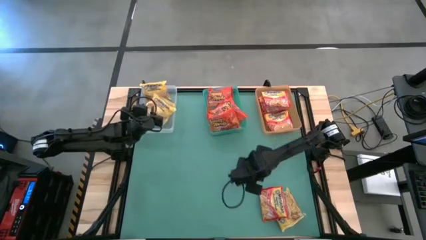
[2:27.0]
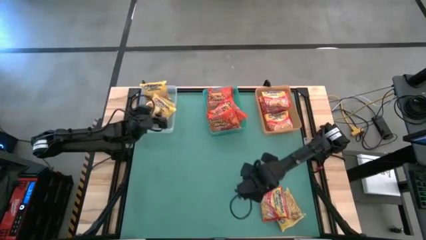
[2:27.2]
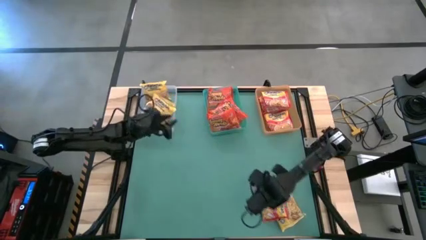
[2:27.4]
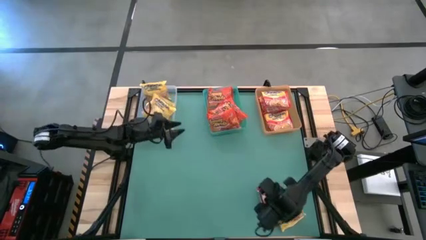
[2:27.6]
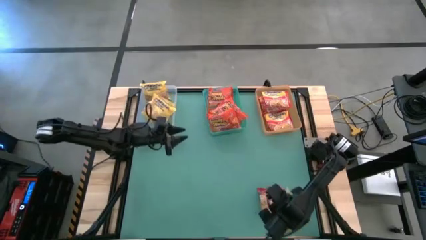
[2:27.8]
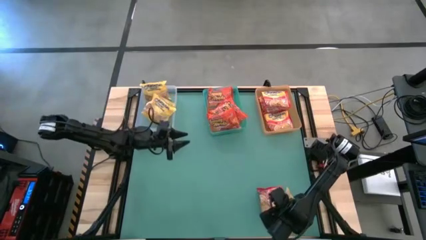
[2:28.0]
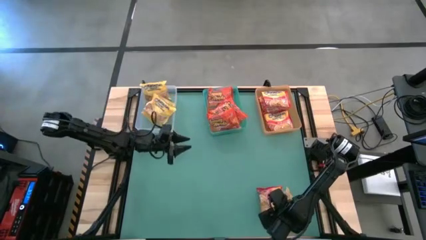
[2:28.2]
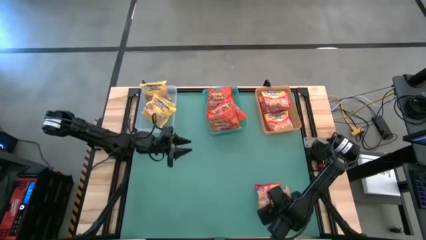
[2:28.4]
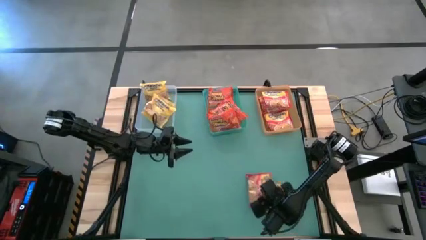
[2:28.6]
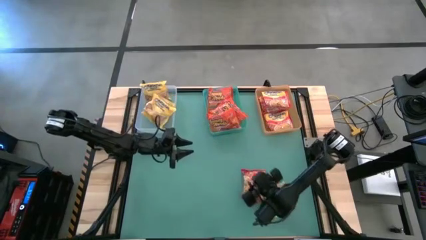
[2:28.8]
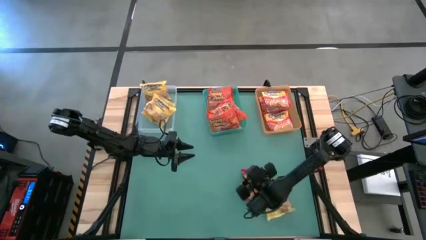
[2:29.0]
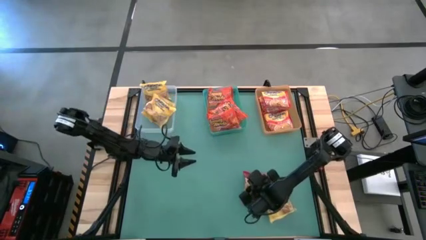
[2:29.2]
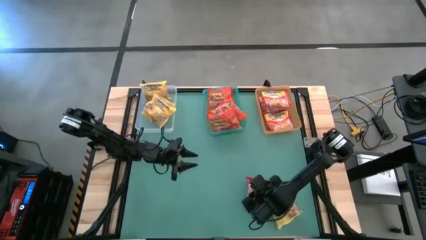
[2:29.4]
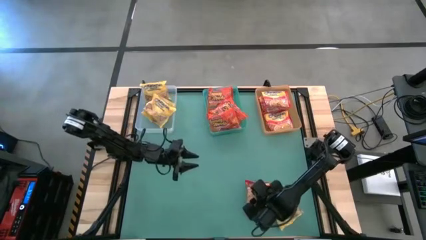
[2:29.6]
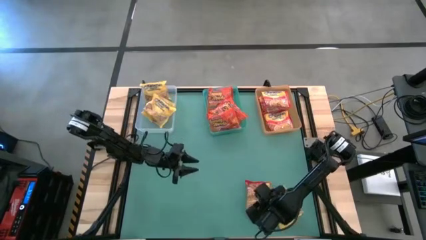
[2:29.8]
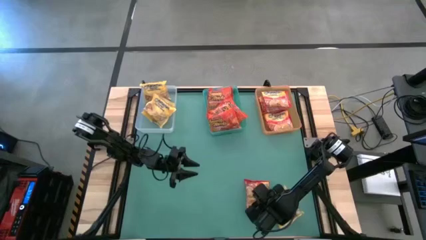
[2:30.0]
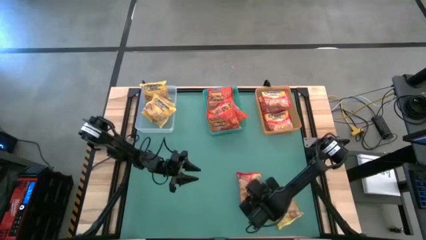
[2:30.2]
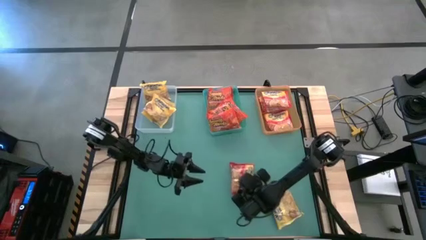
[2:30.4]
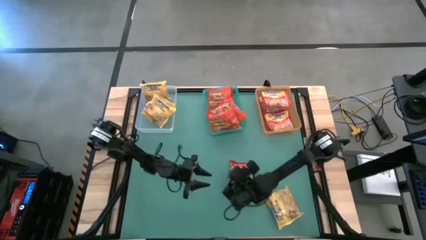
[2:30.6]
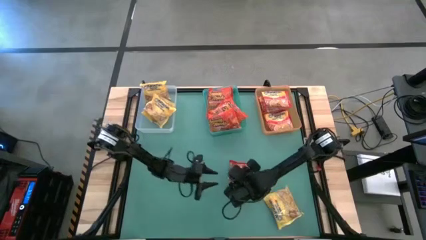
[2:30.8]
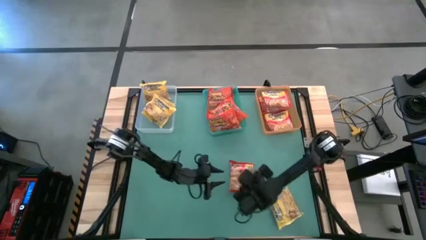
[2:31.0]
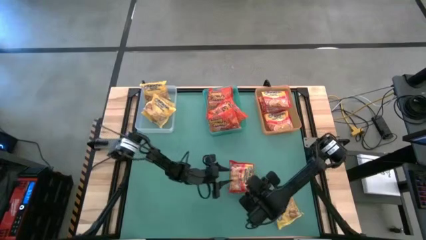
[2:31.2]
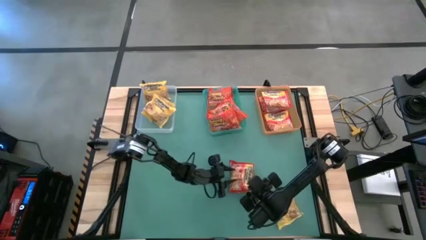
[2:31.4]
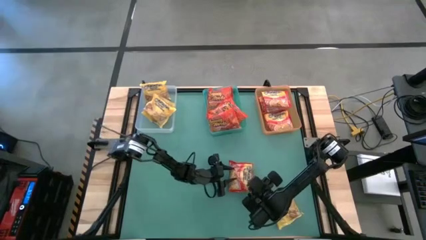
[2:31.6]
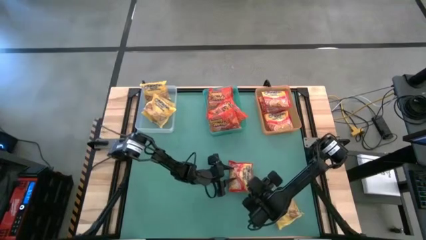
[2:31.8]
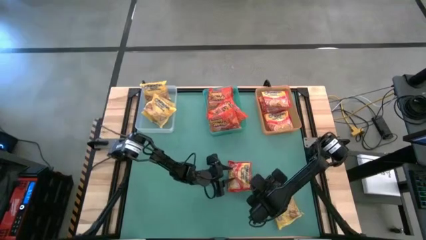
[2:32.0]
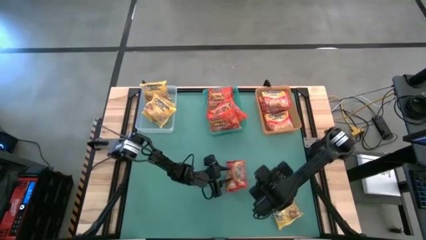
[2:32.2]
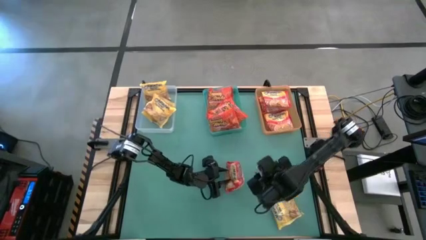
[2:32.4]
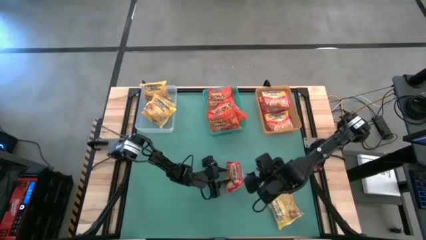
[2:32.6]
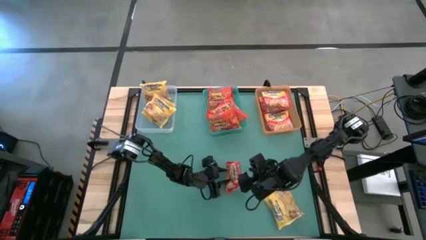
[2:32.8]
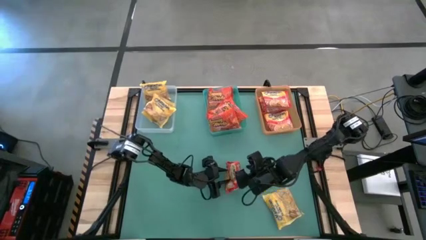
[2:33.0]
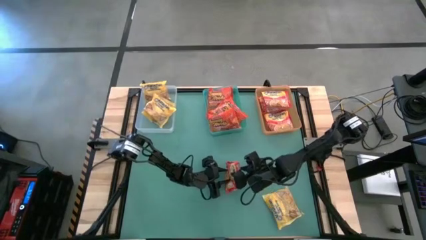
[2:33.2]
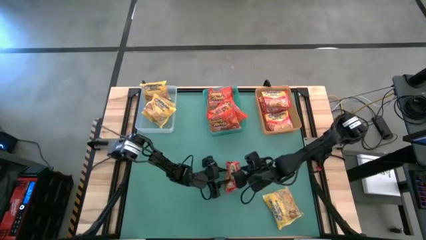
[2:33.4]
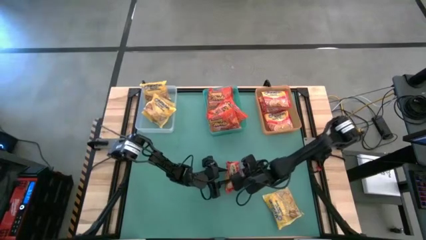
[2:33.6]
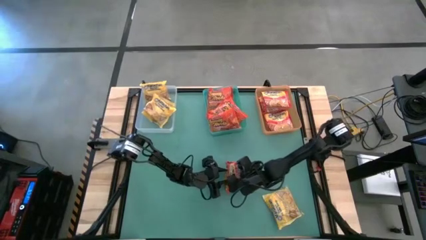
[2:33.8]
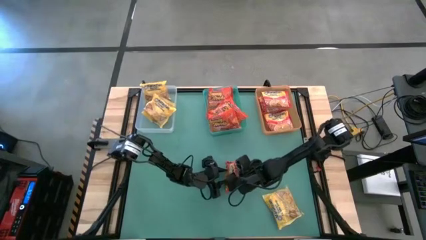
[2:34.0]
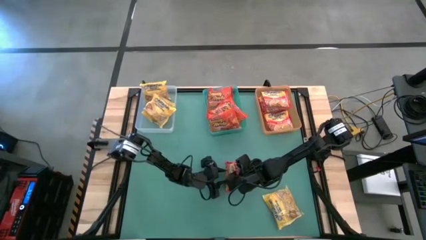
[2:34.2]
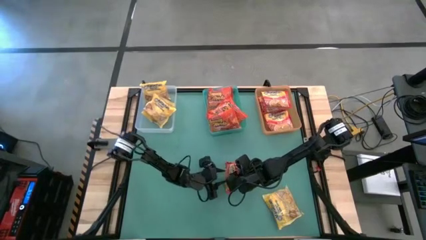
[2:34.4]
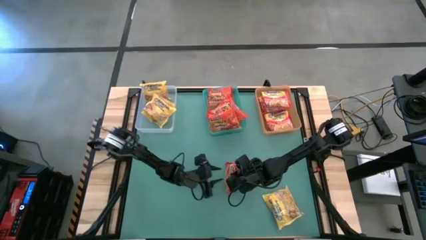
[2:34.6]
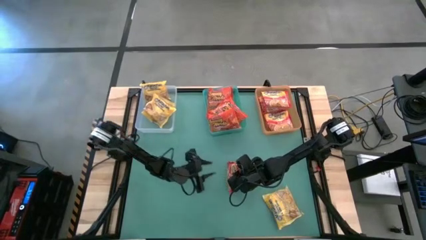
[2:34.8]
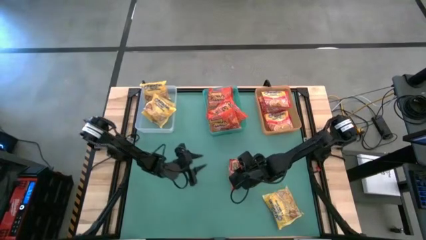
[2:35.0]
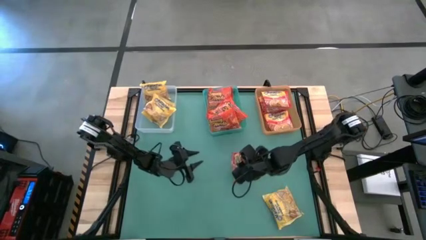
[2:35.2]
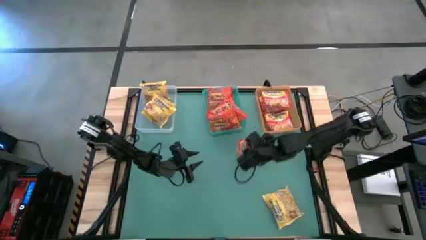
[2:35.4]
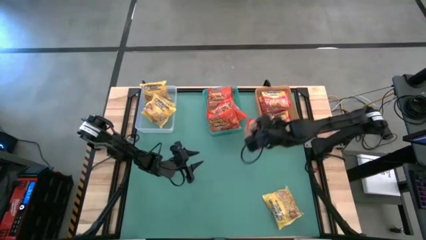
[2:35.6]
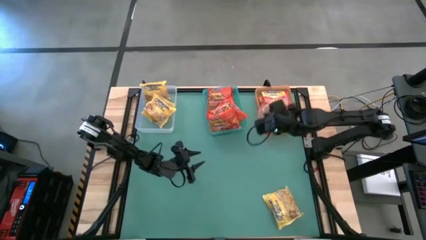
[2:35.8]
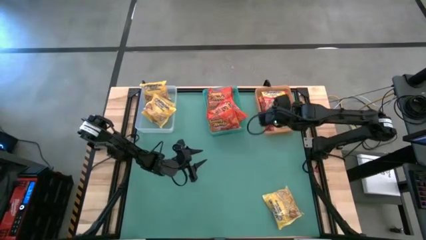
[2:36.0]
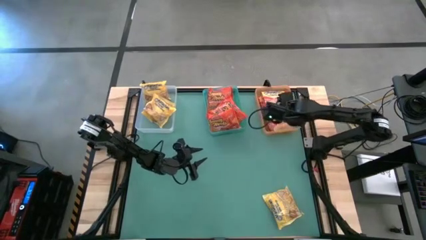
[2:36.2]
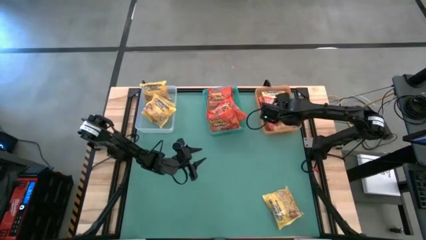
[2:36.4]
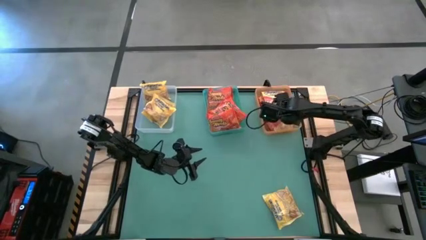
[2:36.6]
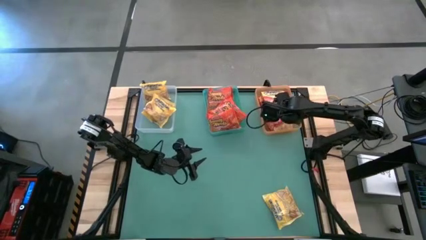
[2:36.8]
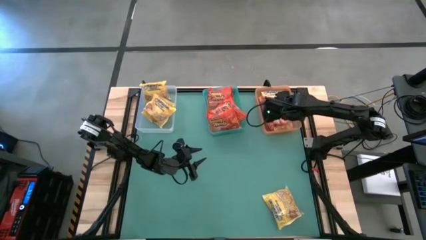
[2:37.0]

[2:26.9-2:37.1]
Task: Sort Maruchan noodles
Put the orange noodle pack into the orange bin

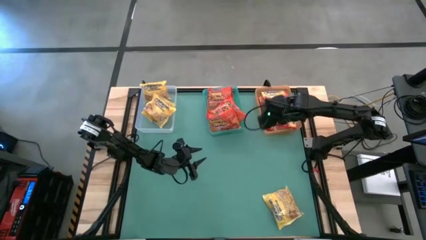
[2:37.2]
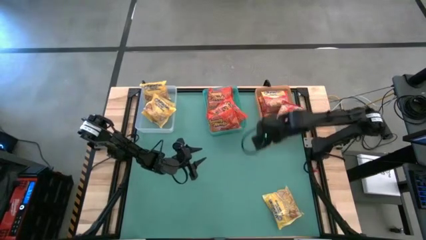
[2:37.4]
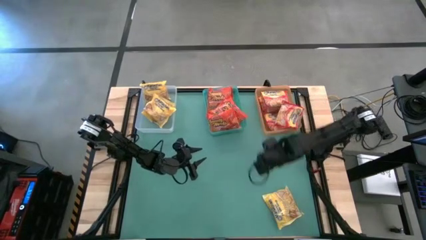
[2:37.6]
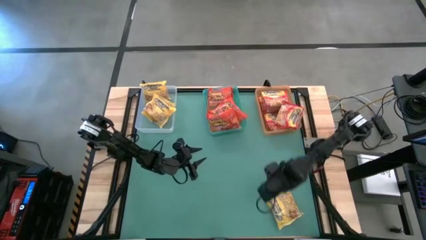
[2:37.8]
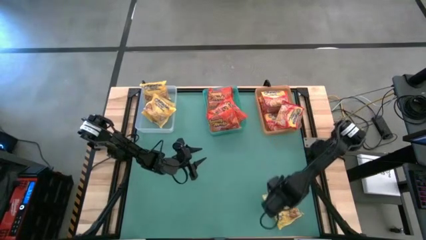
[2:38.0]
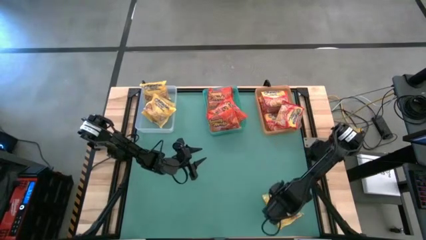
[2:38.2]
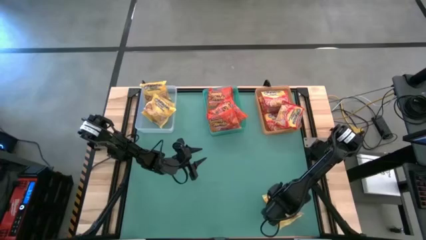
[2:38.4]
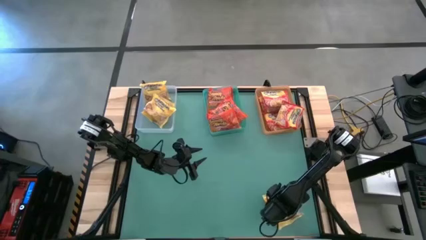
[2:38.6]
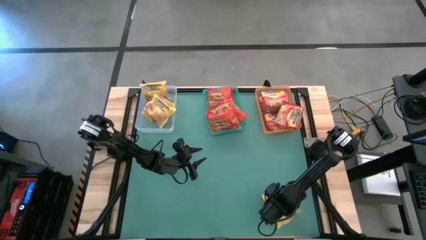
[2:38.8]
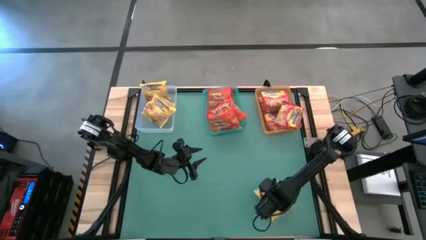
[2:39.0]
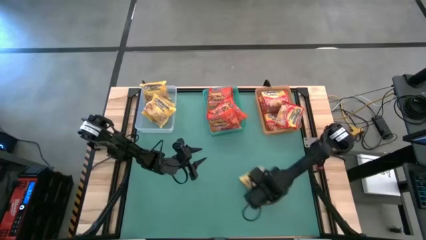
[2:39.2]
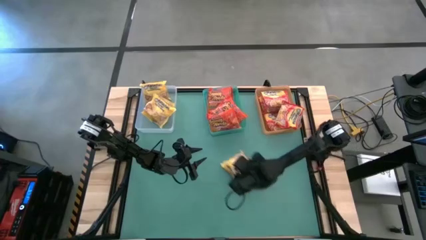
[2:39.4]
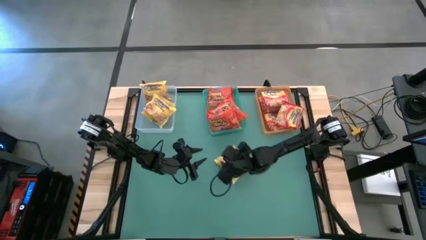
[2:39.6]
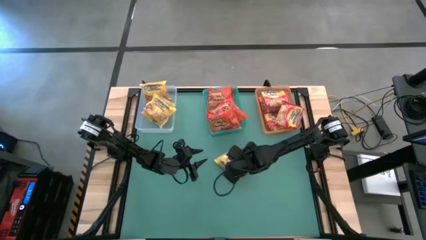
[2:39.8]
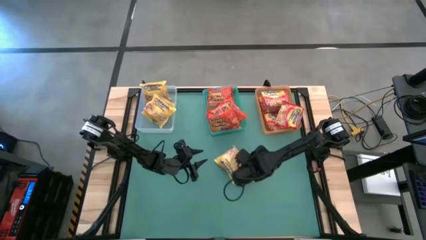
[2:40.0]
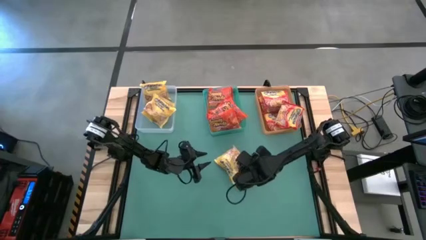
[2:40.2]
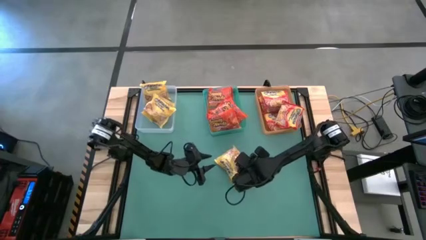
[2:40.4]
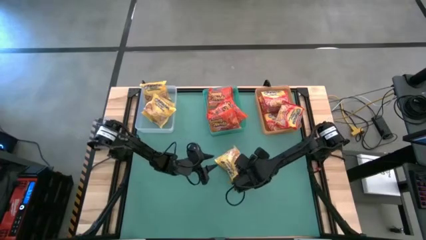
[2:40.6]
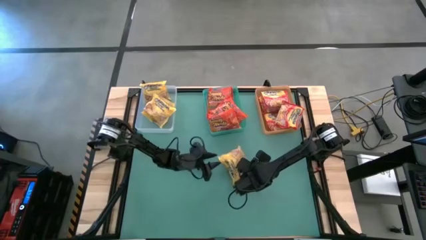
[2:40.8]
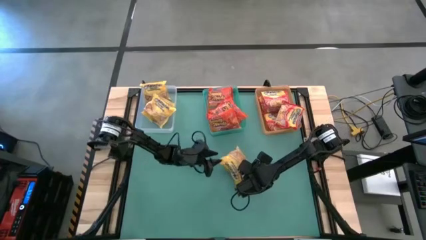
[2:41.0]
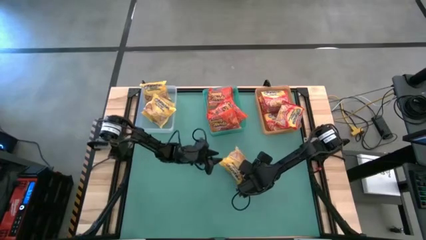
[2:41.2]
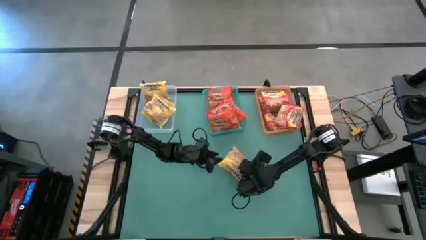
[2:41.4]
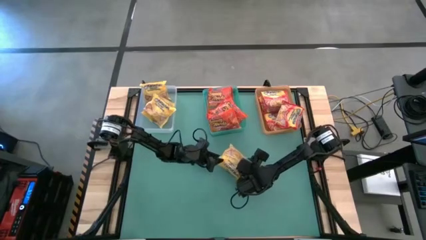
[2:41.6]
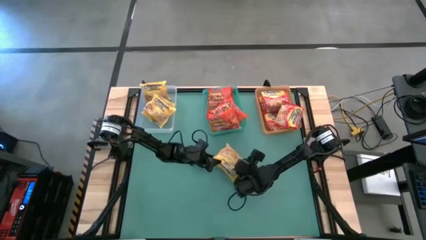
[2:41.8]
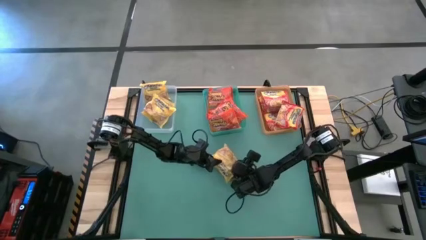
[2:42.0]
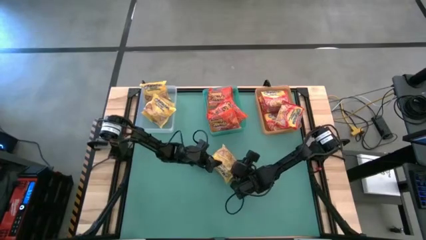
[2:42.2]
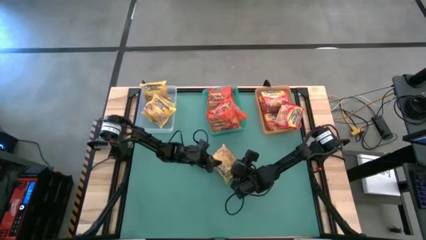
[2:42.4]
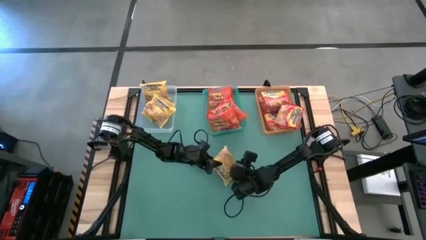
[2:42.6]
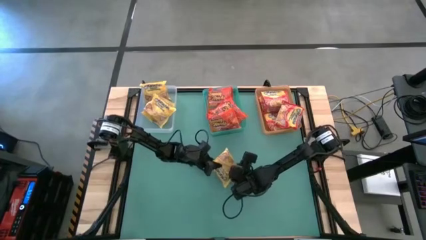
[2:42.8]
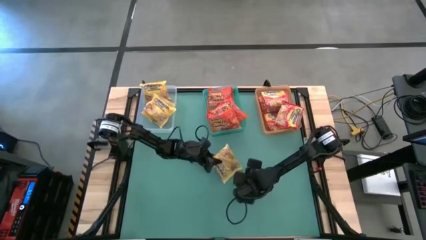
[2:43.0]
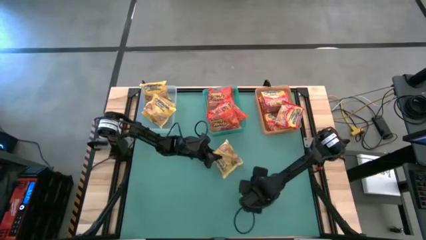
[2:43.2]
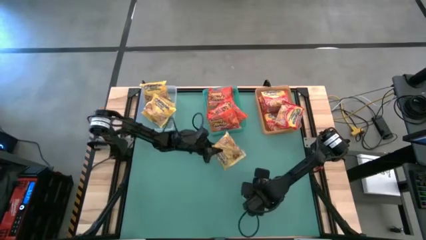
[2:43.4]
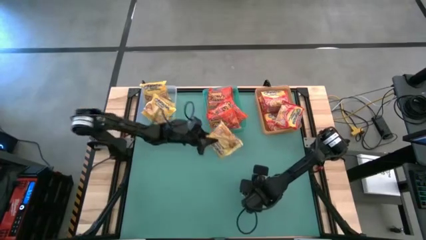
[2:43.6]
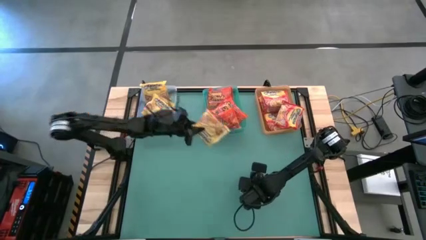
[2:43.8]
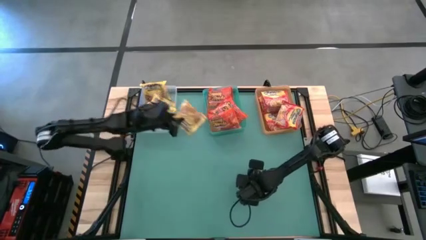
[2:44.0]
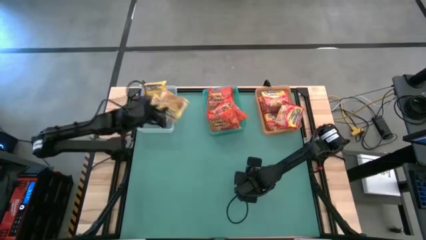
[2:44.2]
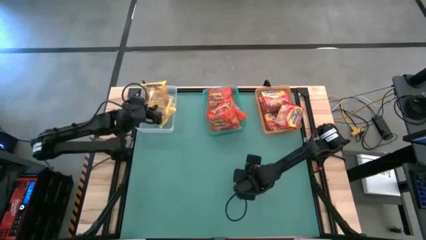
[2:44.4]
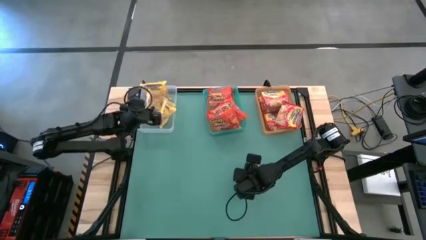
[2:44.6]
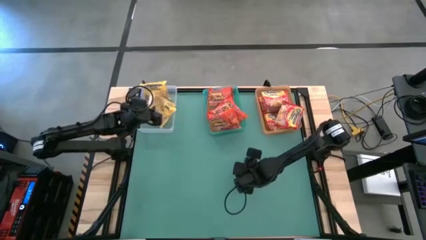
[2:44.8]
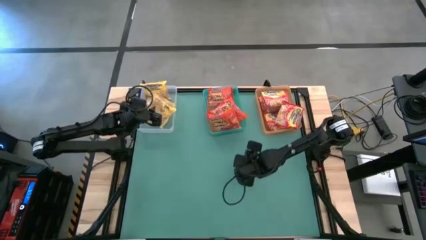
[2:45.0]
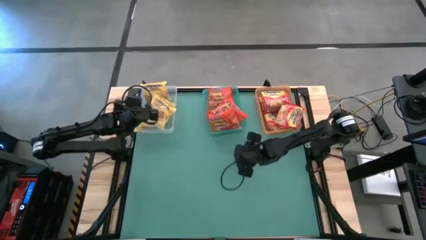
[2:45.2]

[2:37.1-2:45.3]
Put the yellow noodle pack into the transparent bin
